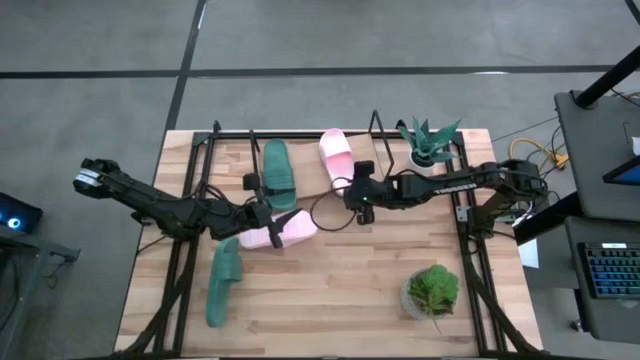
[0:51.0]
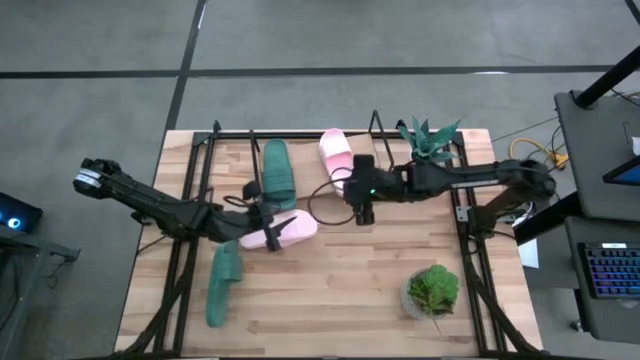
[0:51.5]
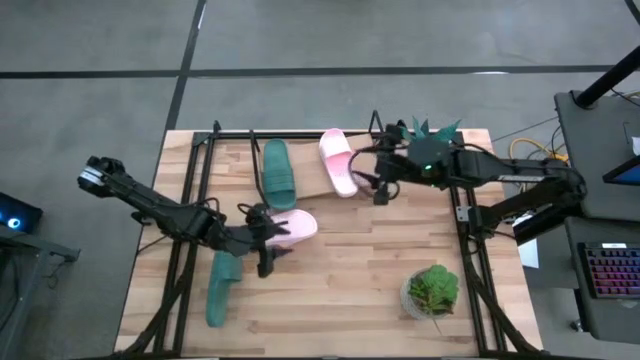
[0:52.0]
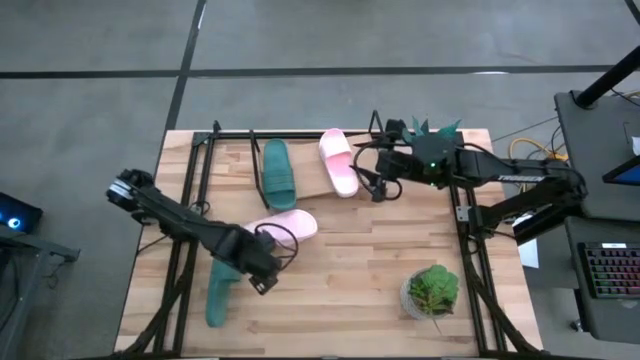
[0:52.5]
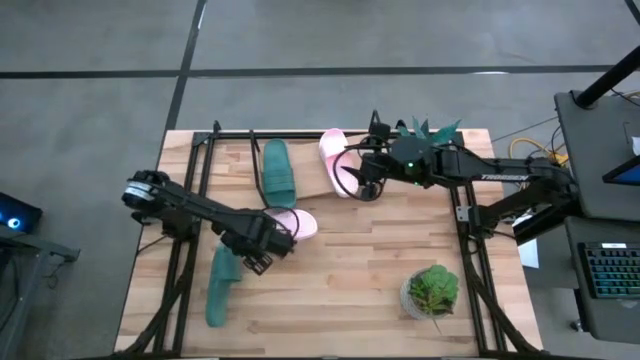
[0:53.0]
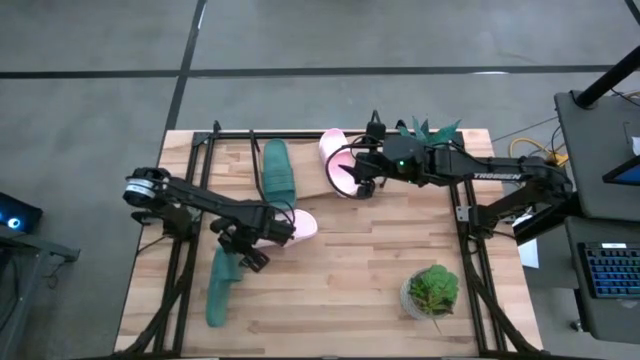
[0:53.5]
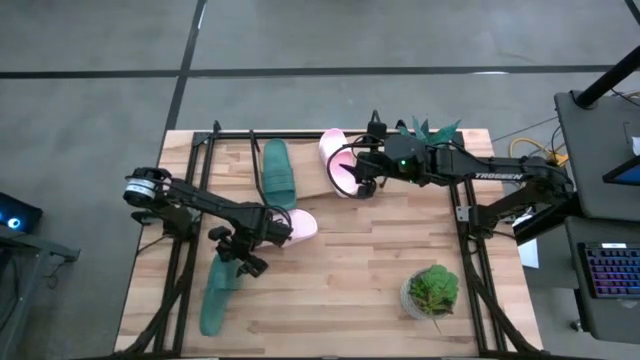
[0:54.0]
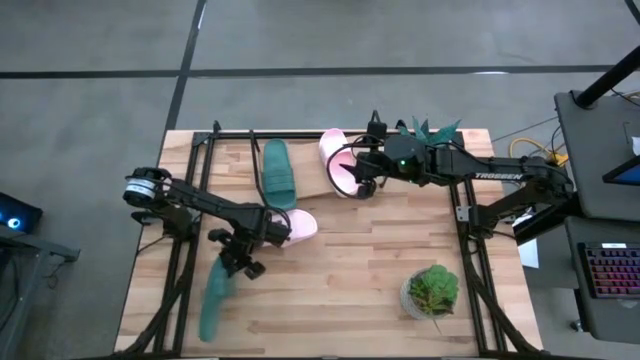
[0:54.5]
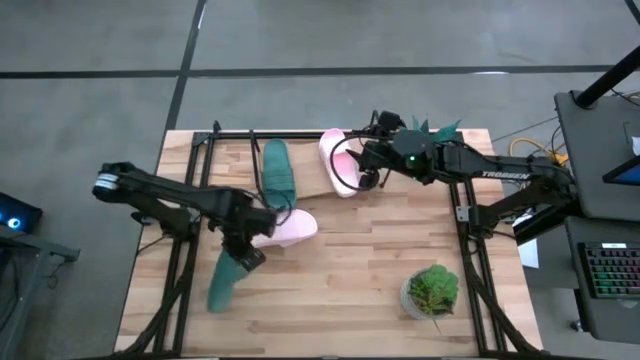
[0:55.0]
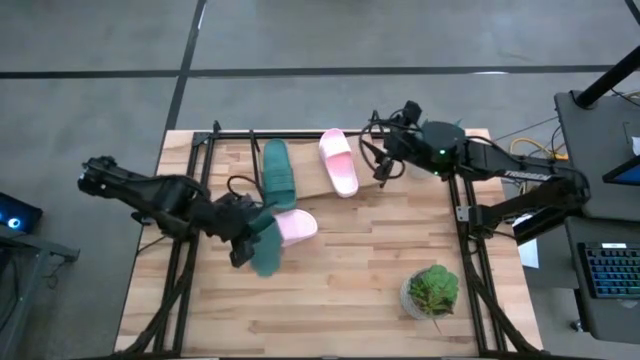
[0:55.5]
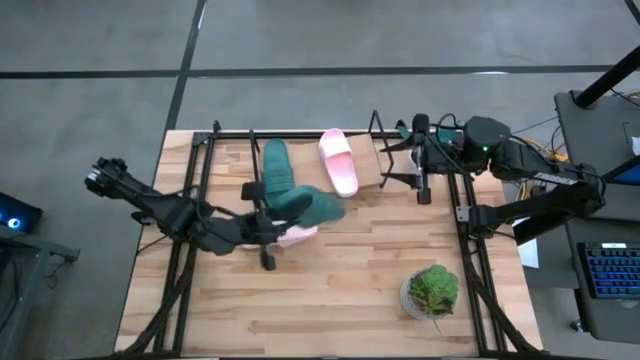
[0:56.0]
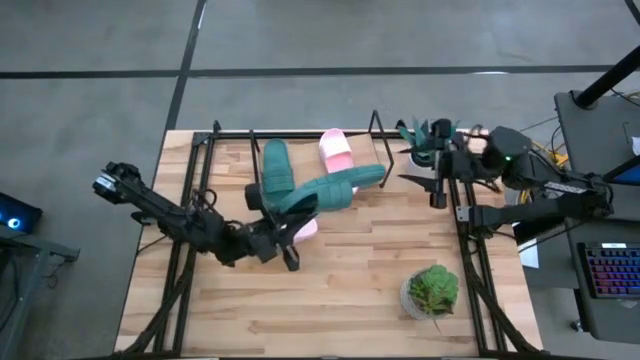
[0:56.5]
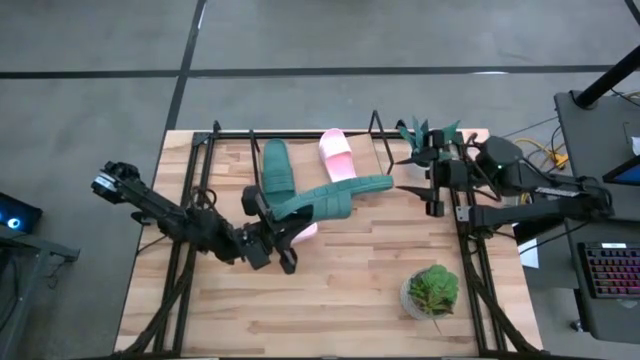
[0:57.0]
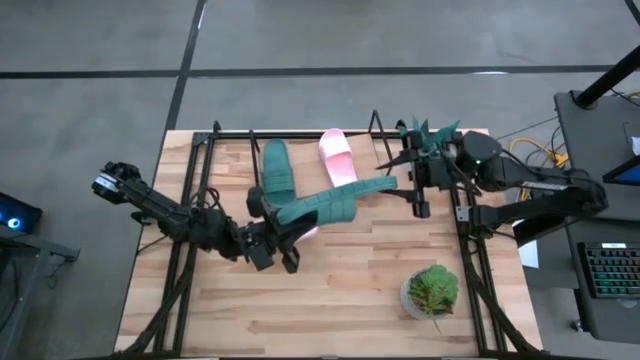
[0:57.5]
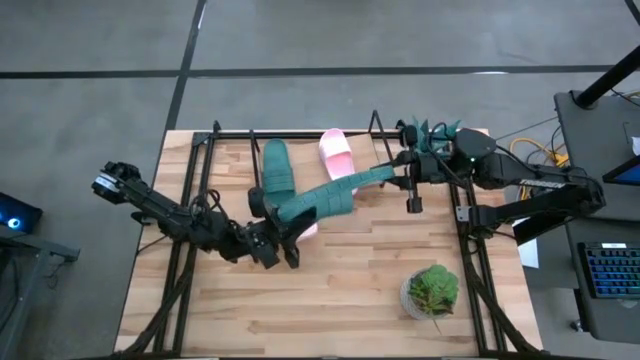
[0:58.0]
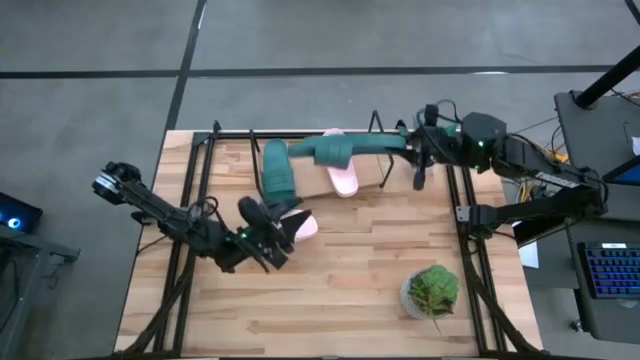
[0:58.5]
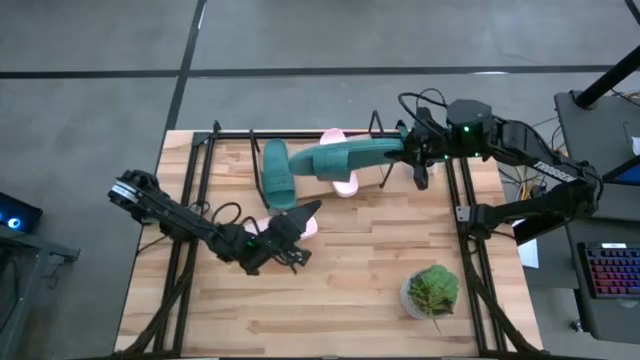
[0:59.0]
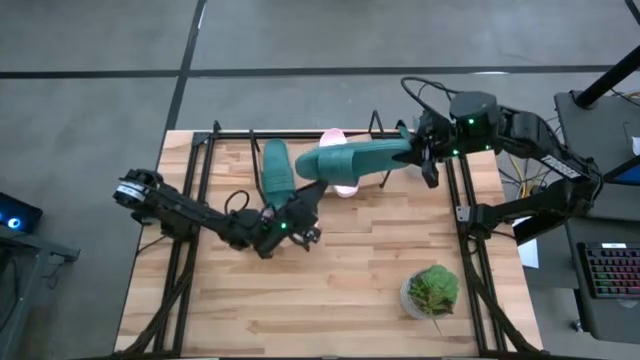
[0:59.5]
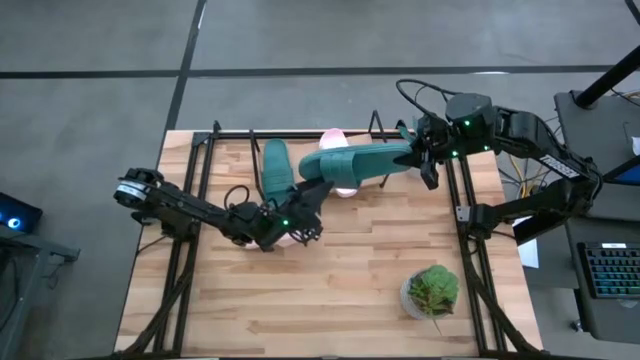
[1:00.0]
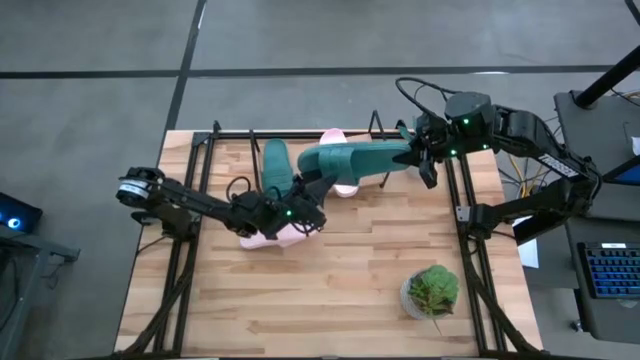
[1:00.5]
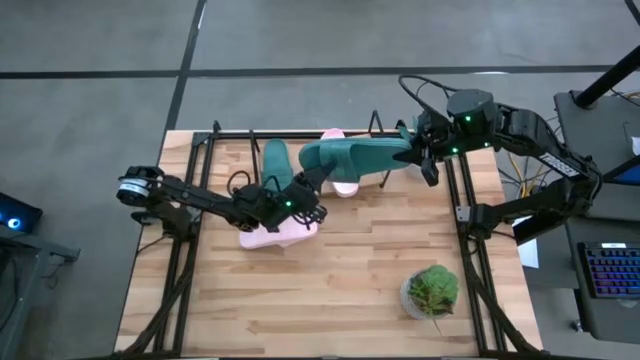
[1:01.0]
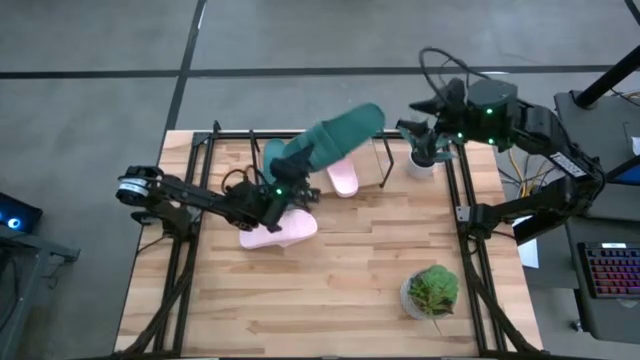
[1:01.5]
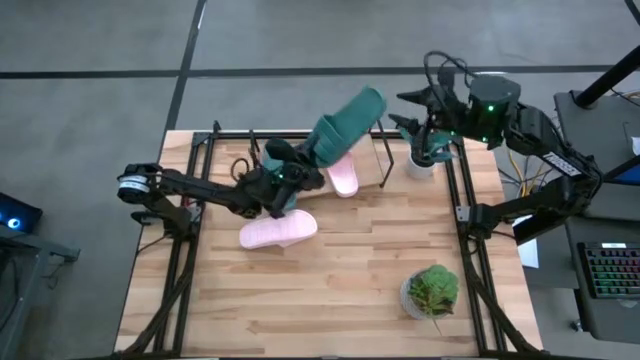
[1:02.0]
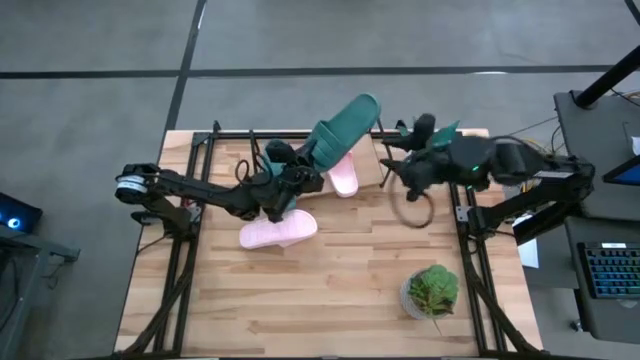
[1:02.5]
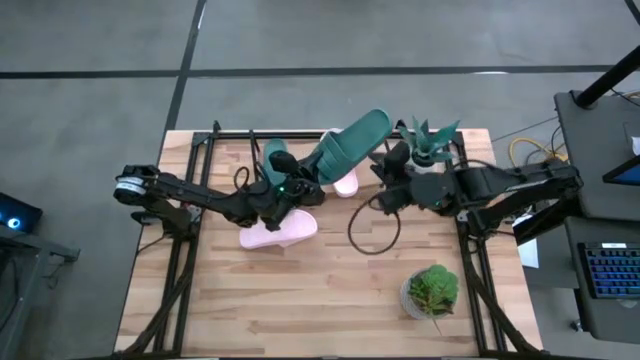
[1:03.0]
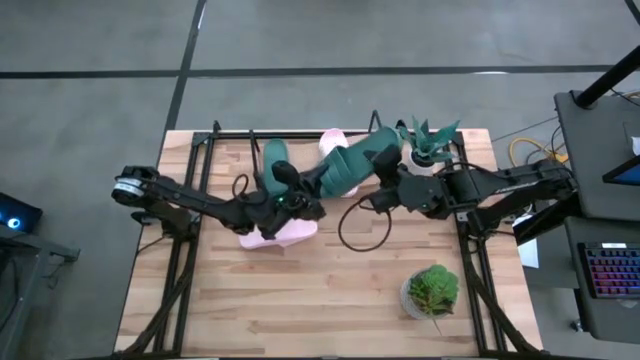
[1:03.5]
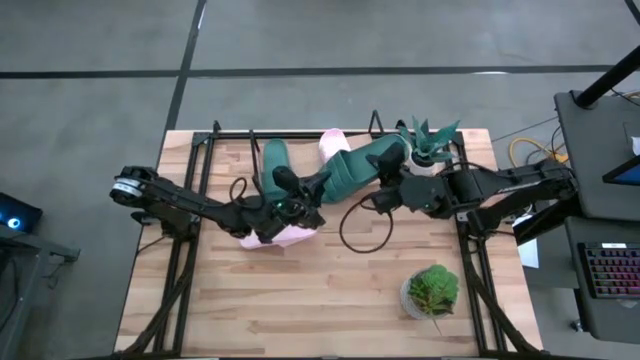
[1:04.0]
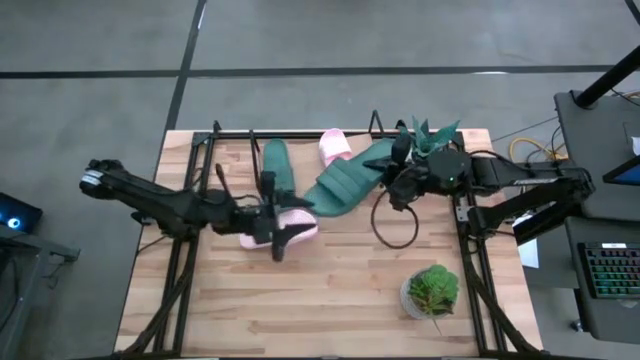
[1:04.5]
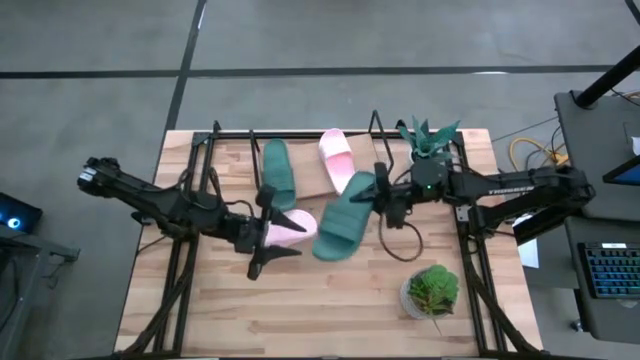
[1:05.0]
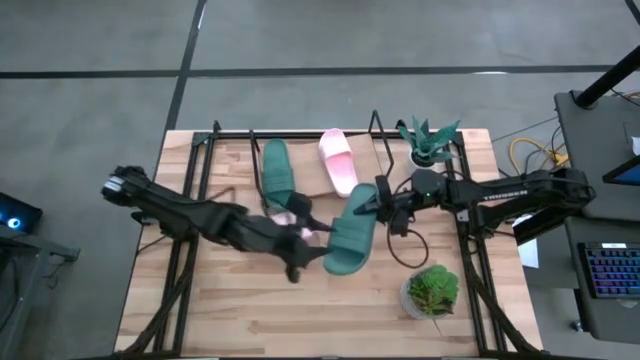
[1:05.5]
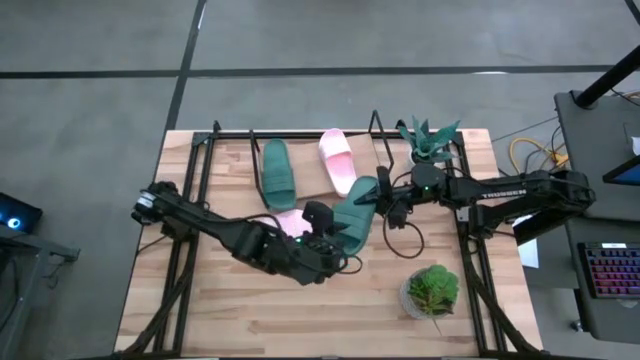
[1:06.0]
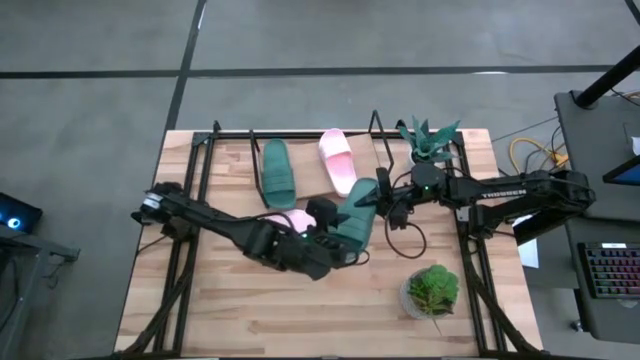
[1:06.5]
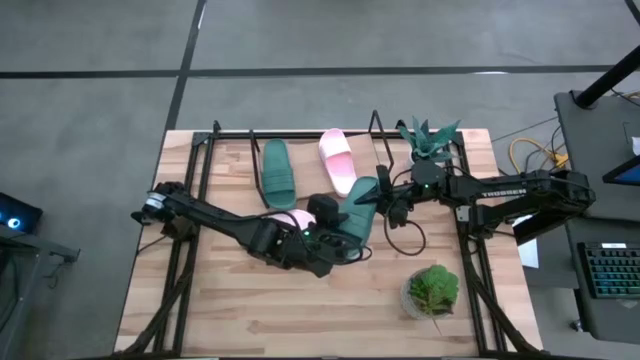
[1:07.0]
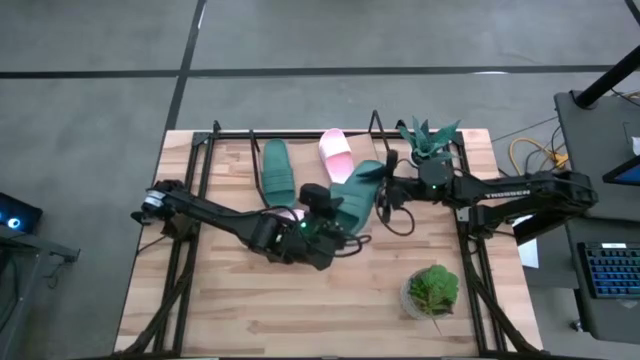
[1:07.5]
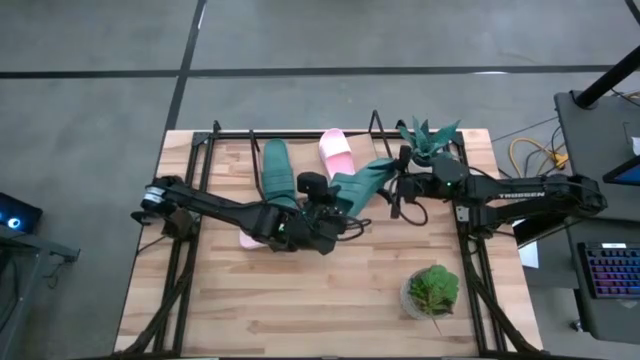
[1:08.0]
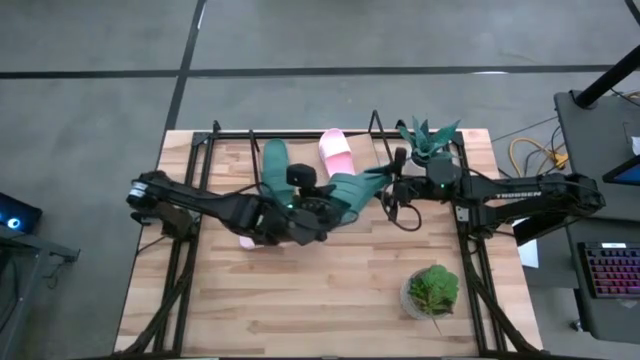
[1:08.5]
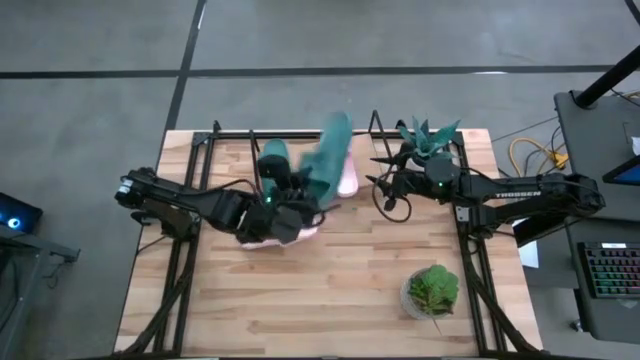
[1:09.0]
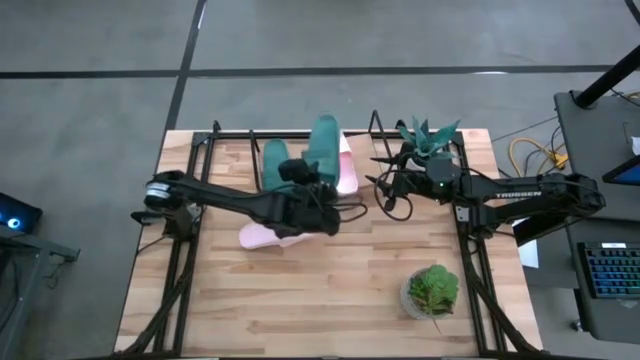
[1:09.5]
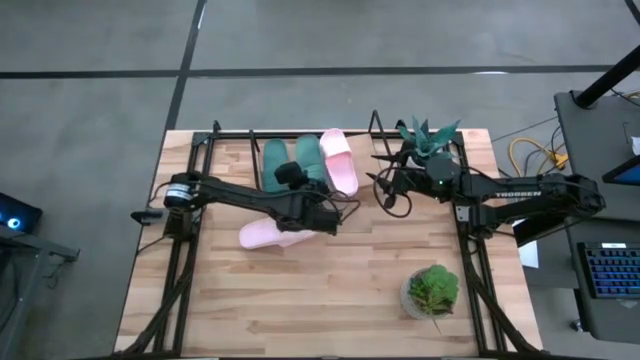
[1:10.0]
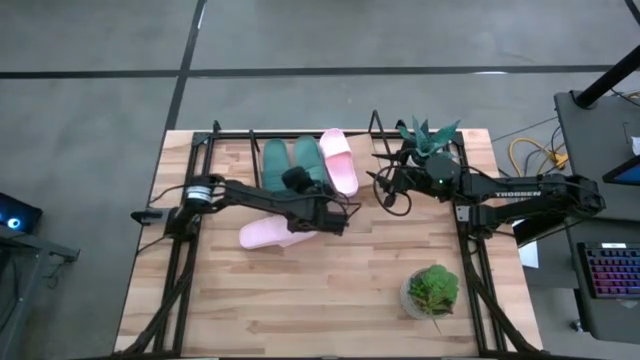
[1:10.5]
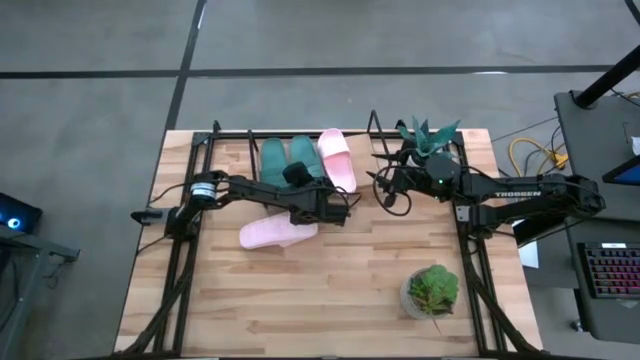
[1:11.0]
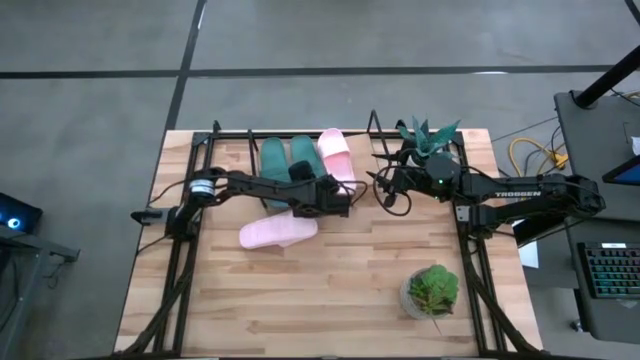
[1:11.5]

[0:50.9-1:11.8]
Task: Pick and place slides into the shelf
Put the green slide on the shelf
